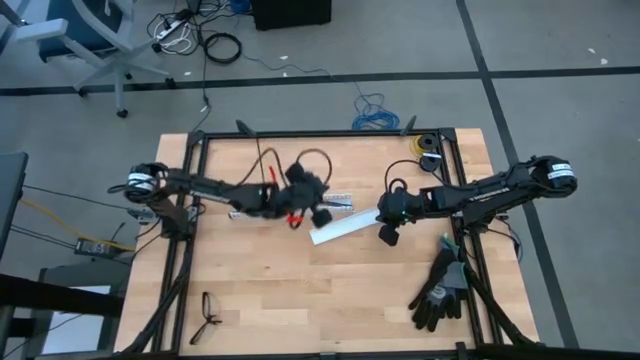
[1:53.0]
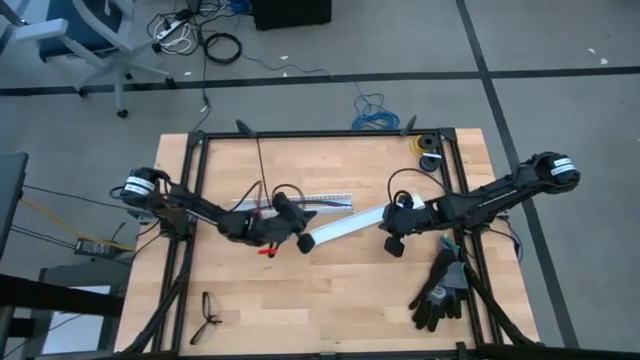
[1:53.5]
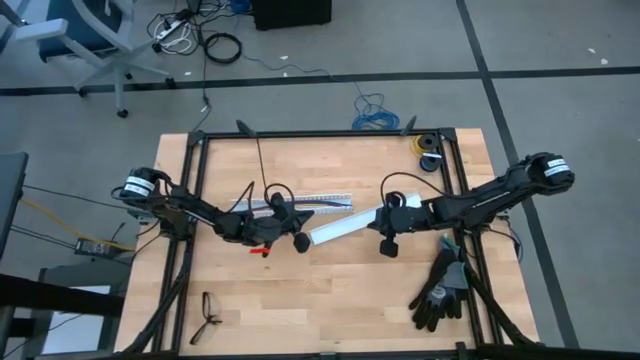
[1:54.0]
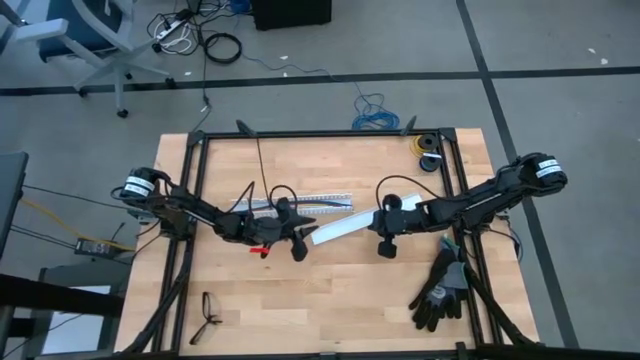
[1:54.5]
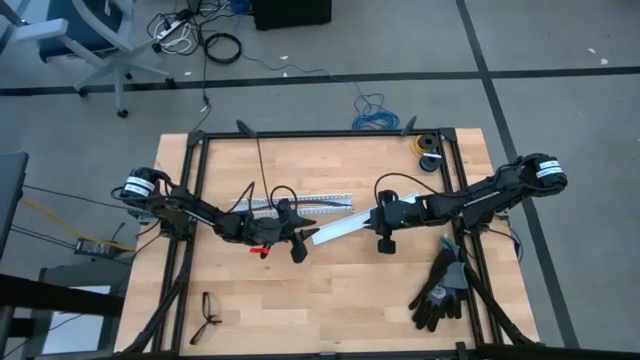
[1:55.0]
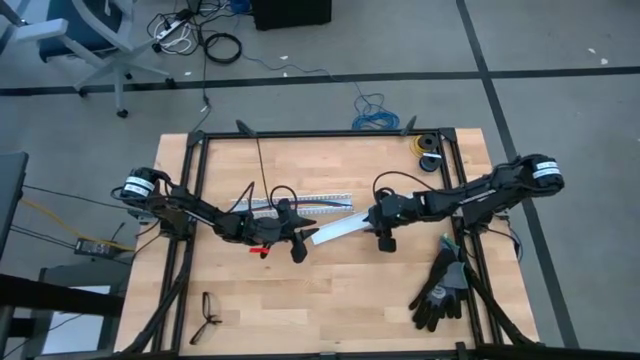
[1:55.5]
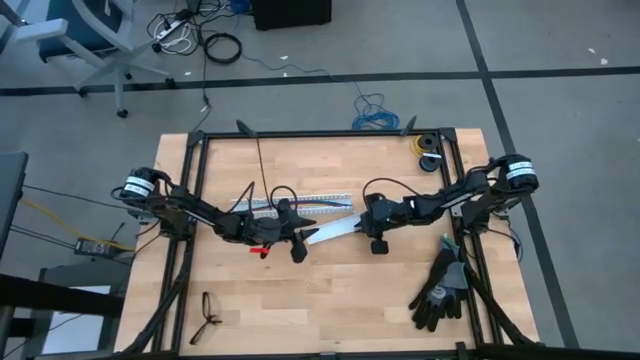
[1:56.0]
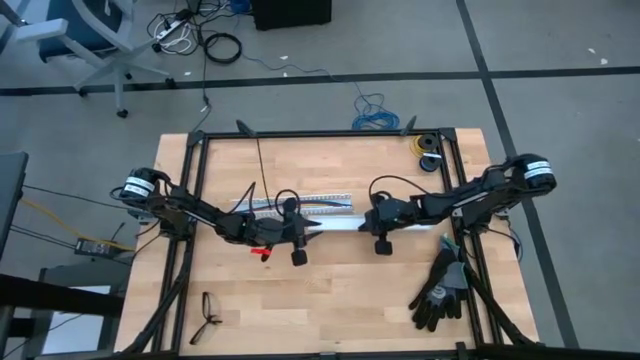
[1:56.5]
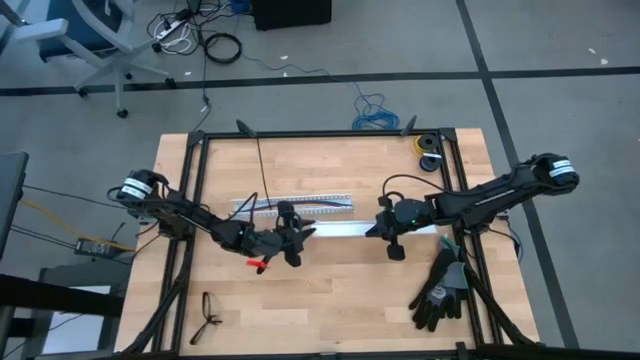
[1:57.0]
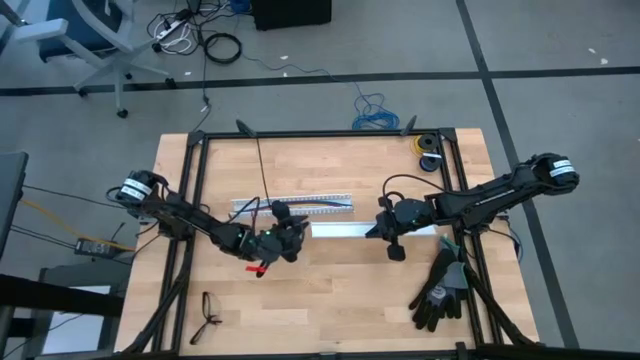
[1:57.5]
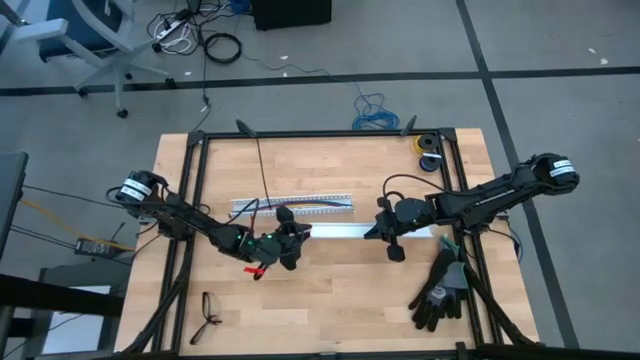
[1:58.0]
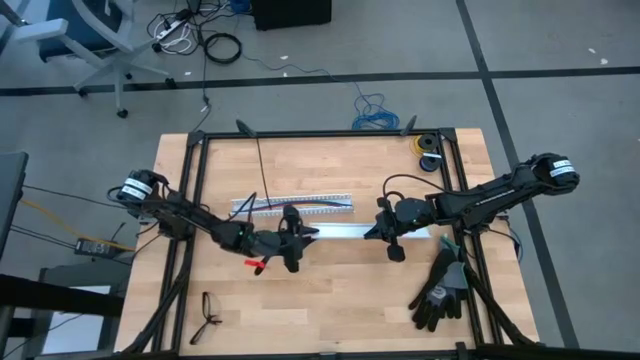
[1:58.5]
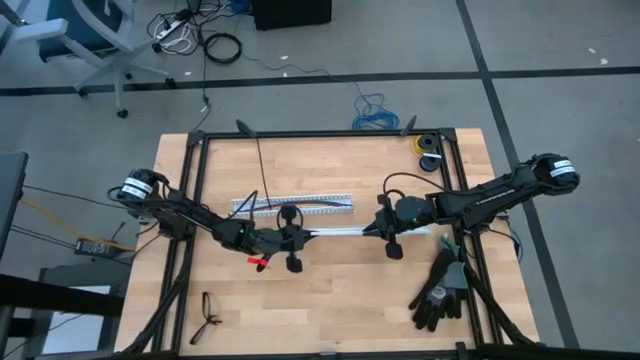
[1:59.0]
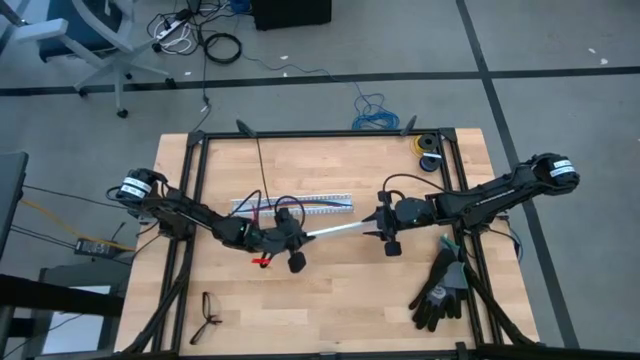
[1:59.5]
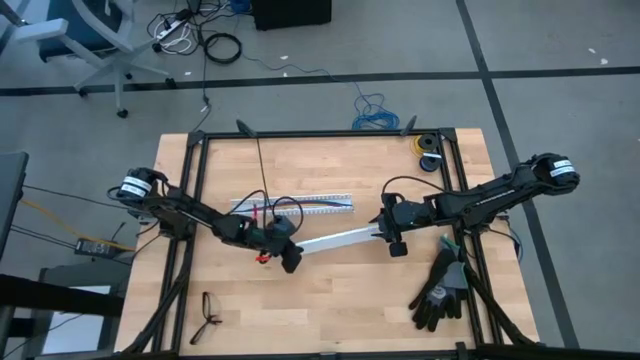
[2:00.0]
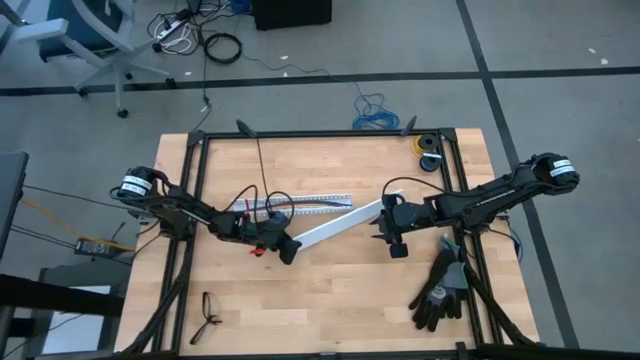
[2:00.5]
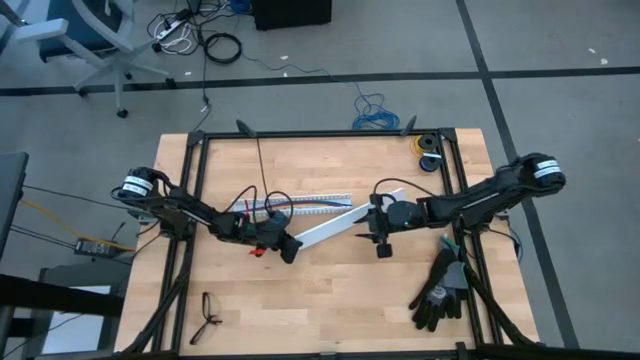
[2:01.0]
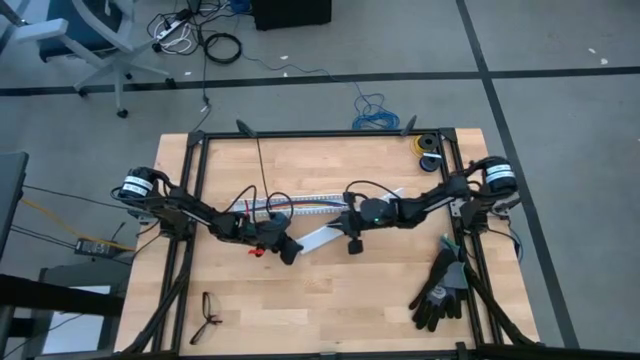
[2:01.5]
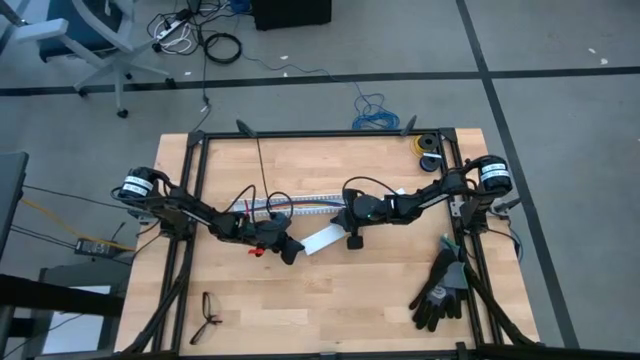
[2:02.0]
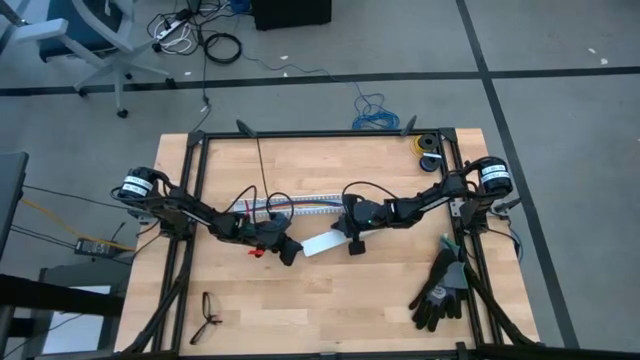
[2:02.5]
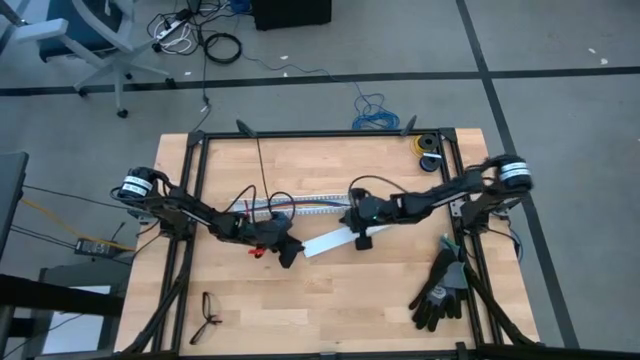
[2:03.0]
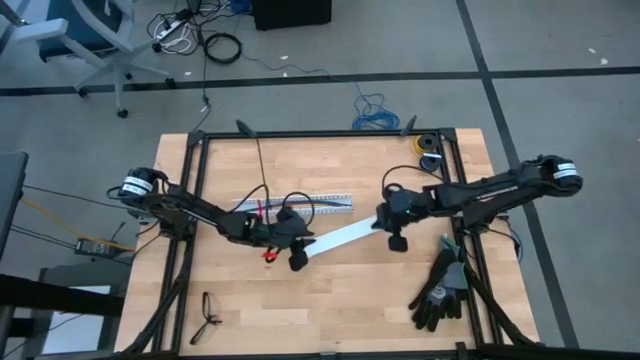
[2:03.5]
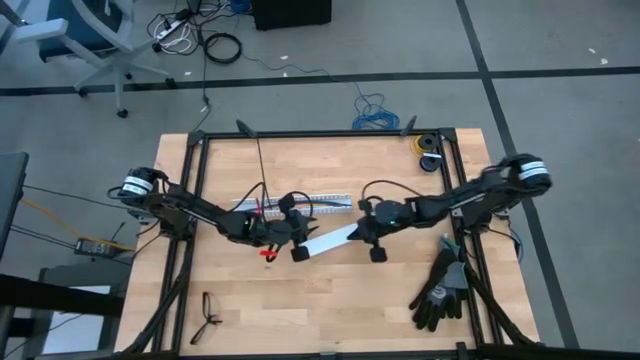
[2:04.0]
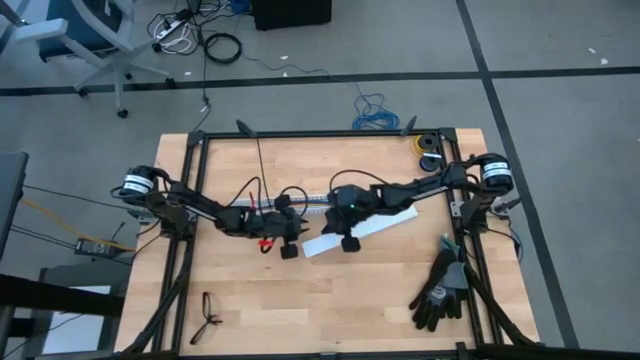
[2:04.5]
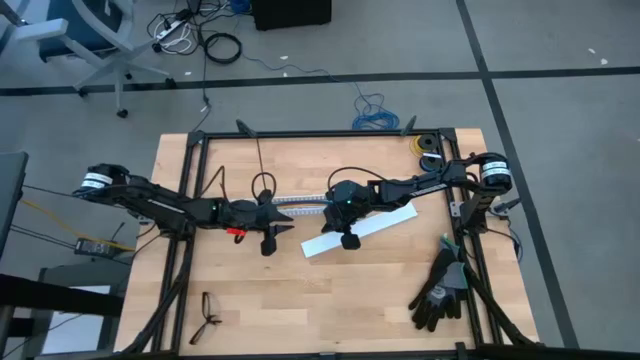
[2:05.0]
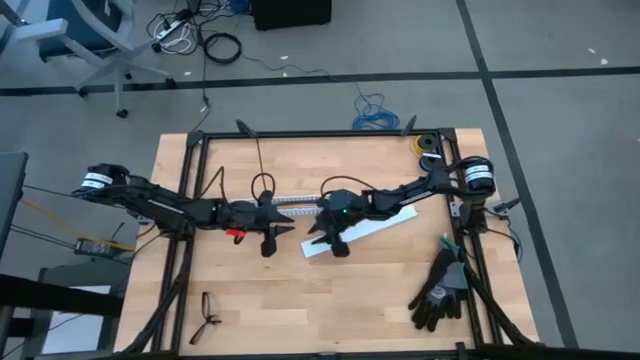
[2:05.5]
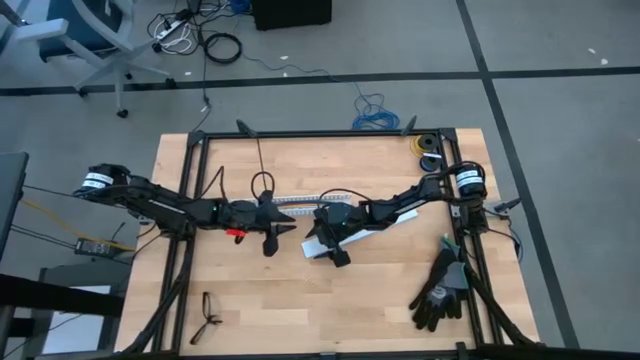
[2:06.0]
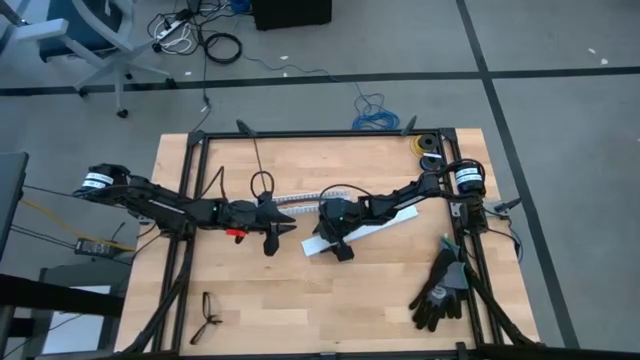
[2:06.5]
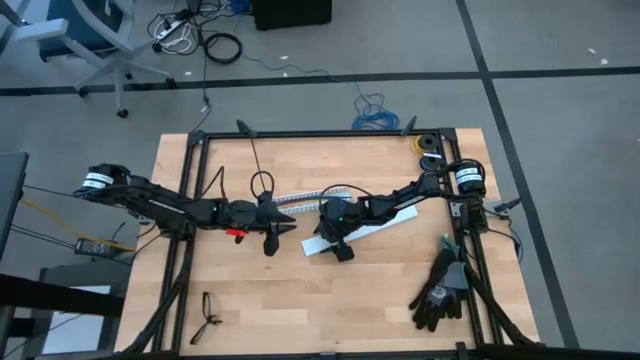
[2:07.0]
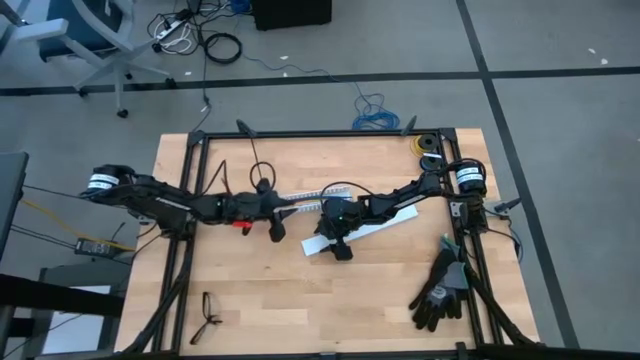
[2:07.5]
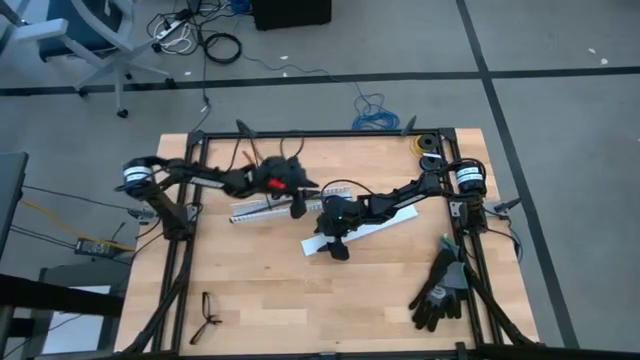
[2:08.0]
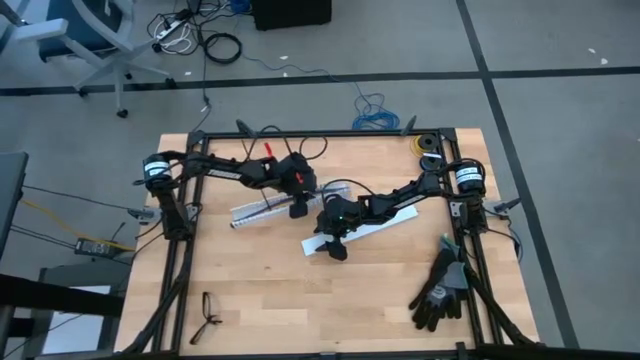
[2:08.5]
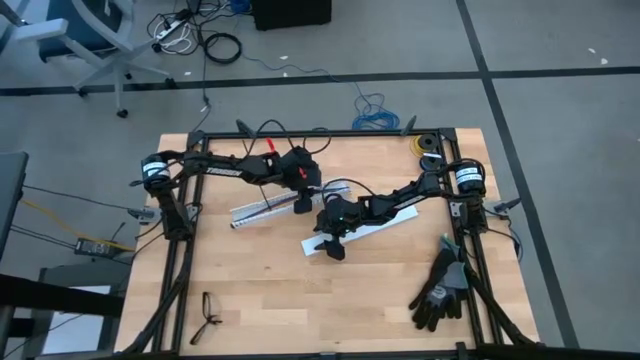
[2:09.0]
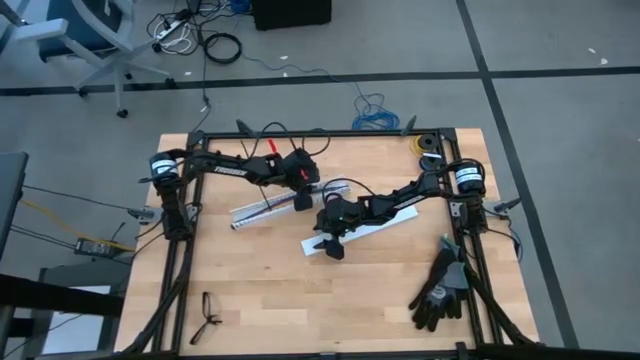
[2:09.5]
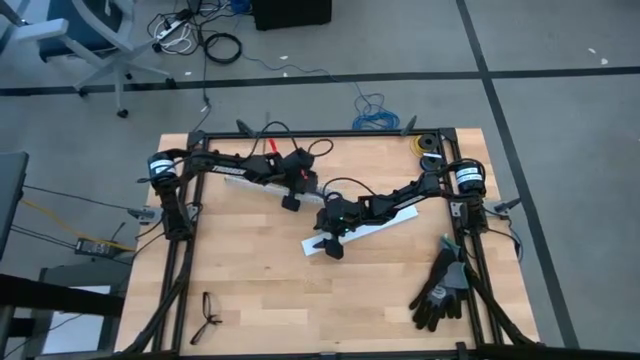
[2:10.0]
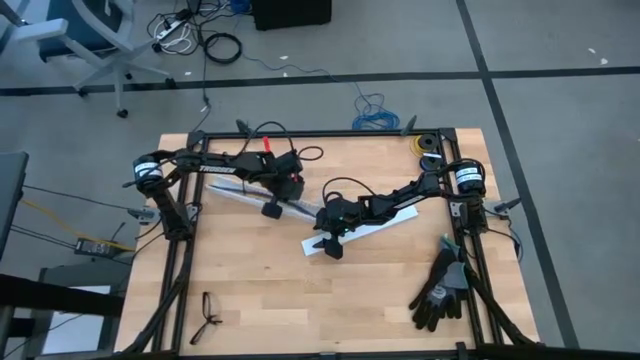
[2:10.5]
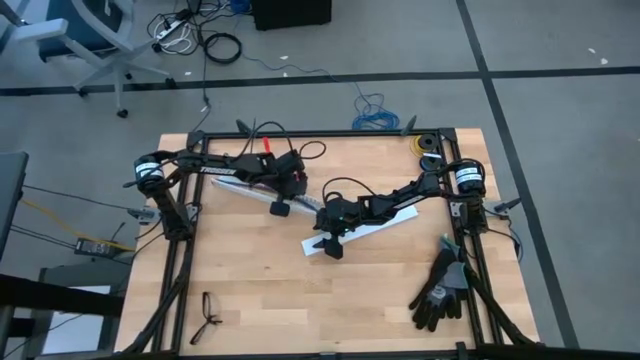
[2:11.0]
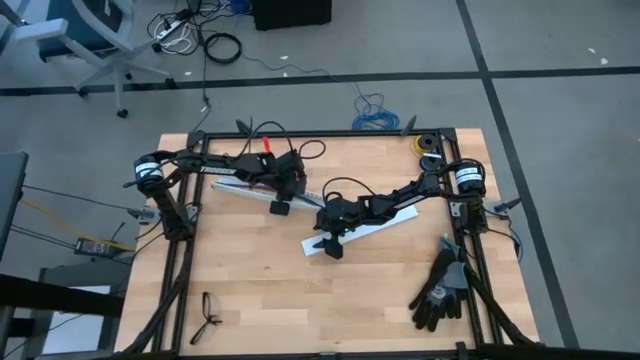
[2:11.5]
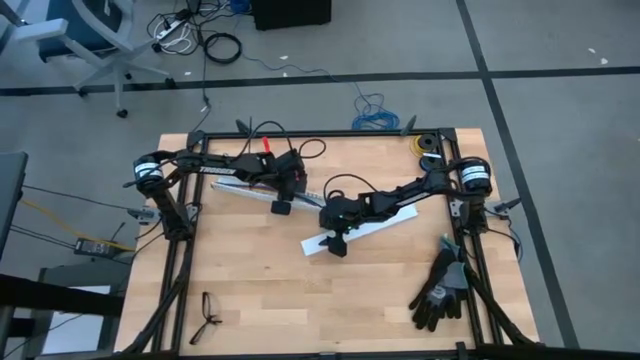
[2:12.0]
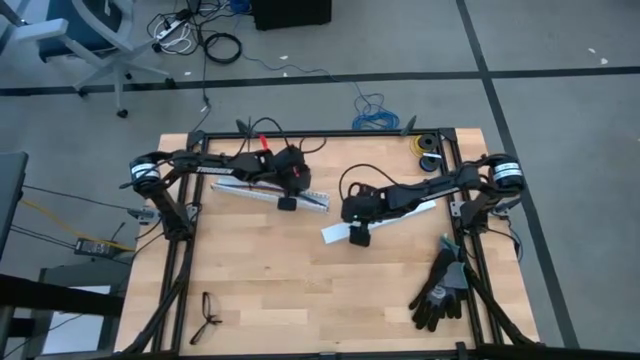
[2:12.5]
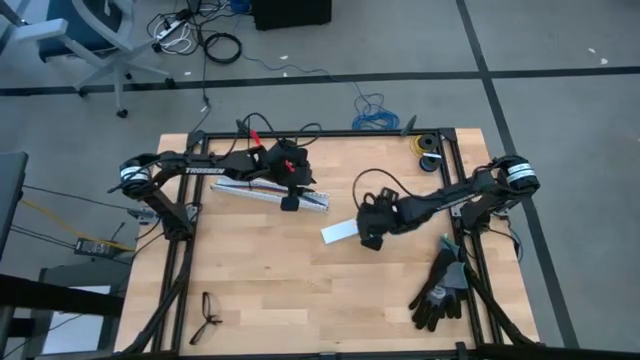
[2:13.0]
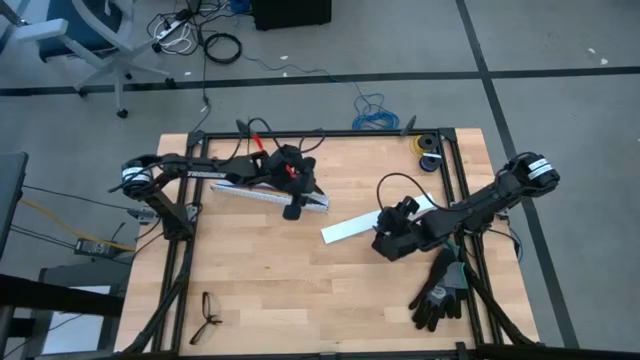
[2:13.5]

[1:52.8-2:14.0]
Task: Ziptie cables
Close the white cable duct with the white cable duct cover
